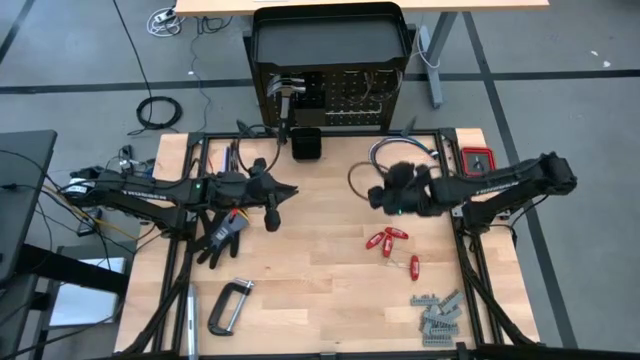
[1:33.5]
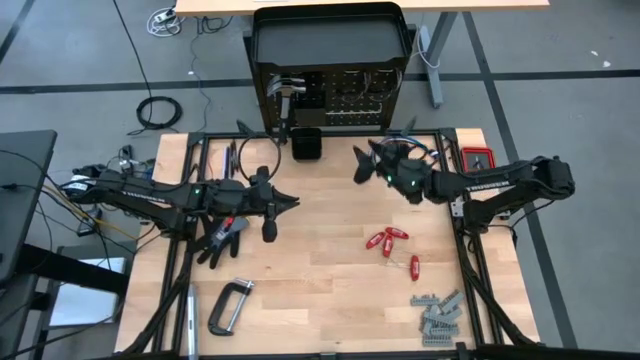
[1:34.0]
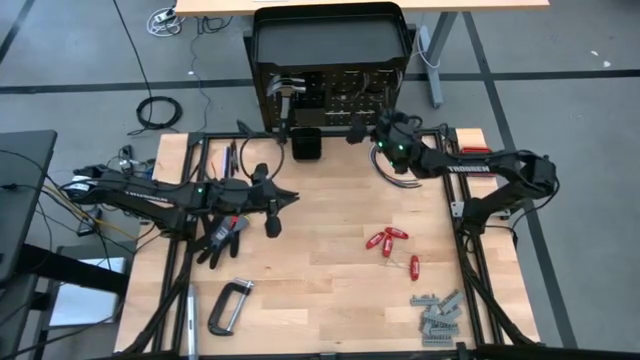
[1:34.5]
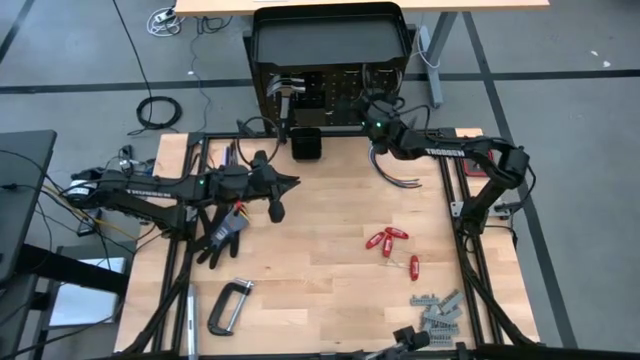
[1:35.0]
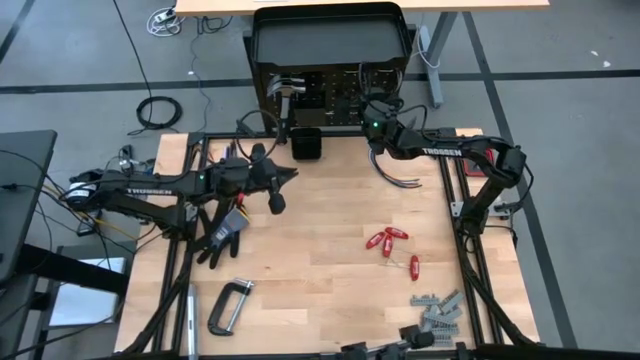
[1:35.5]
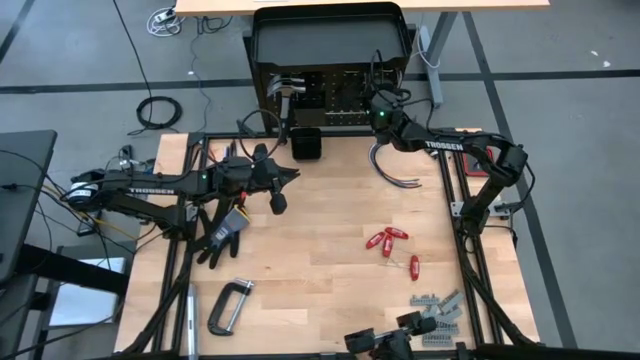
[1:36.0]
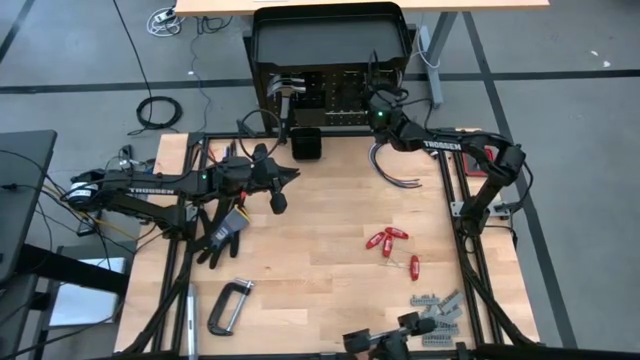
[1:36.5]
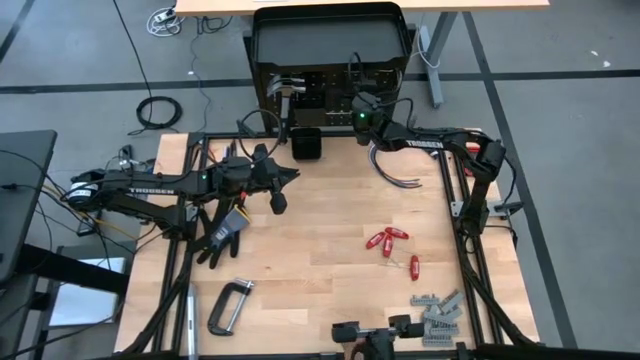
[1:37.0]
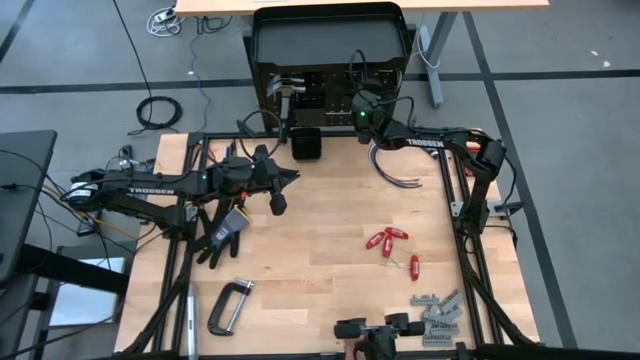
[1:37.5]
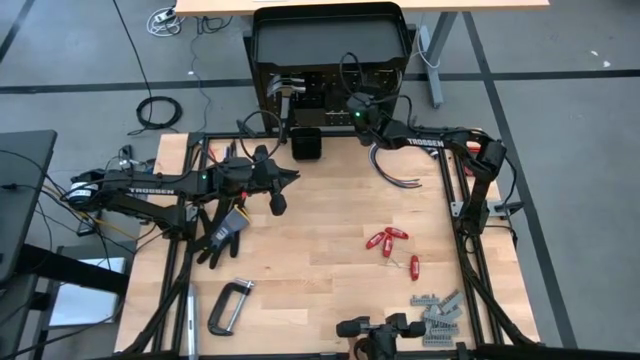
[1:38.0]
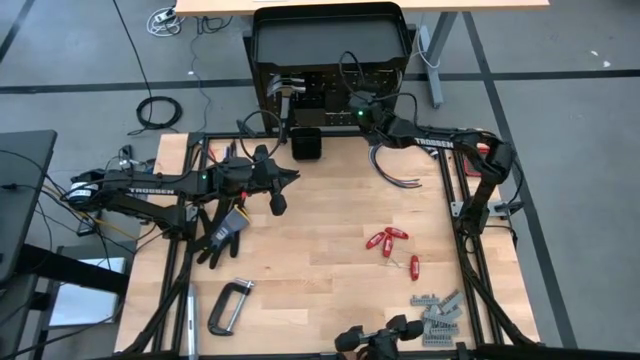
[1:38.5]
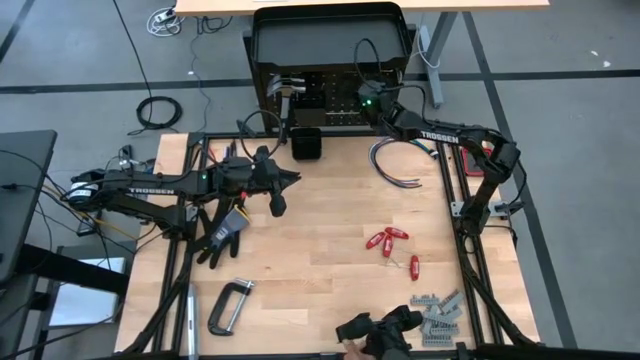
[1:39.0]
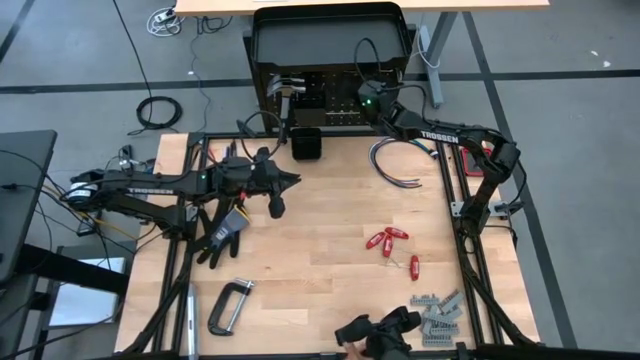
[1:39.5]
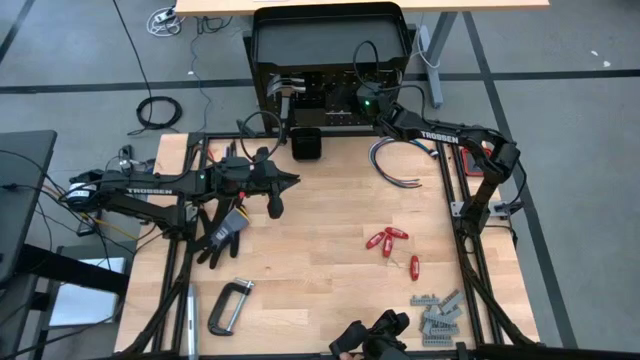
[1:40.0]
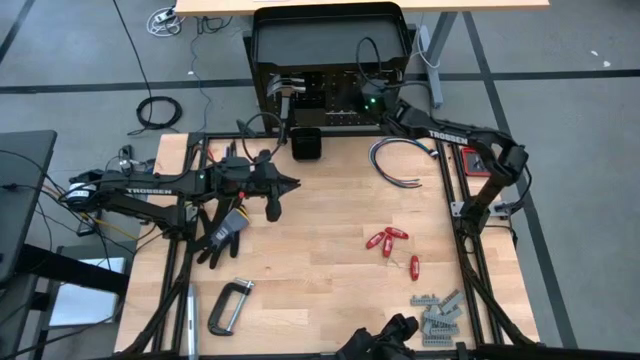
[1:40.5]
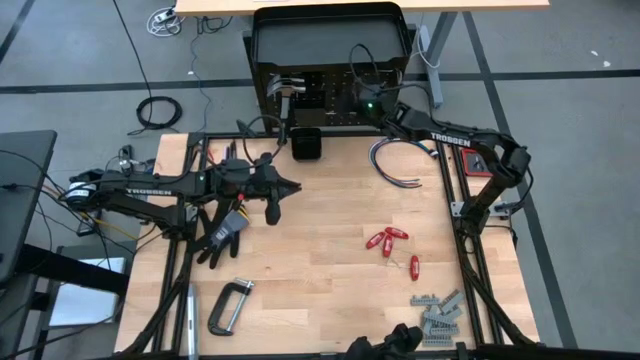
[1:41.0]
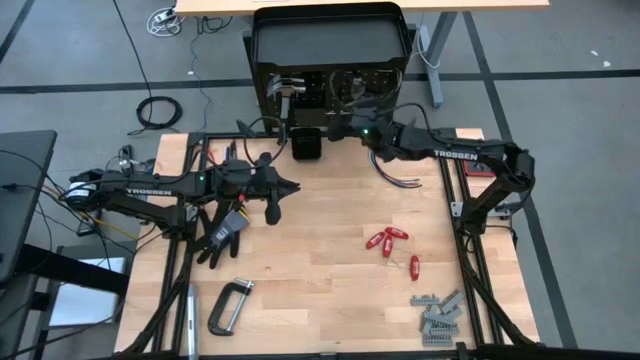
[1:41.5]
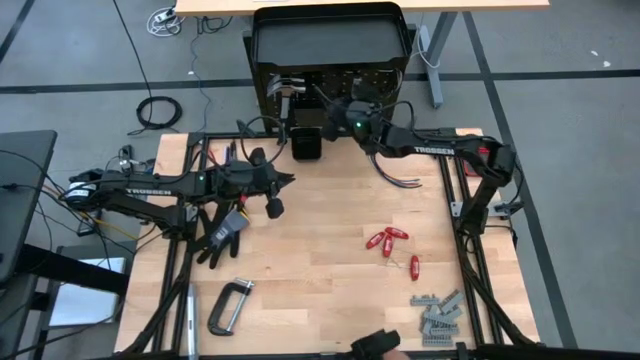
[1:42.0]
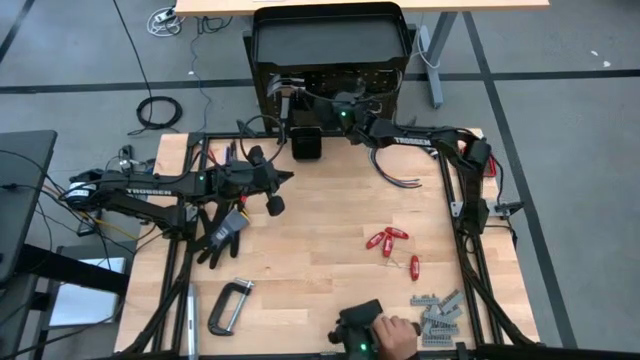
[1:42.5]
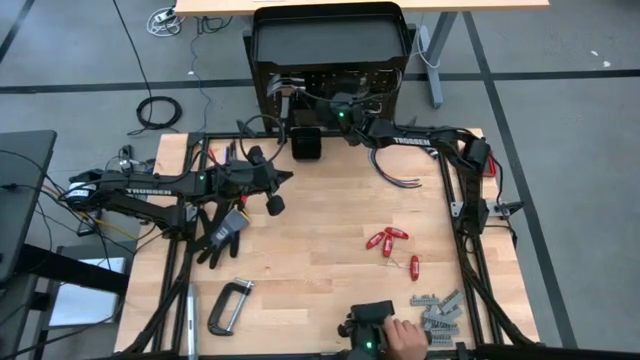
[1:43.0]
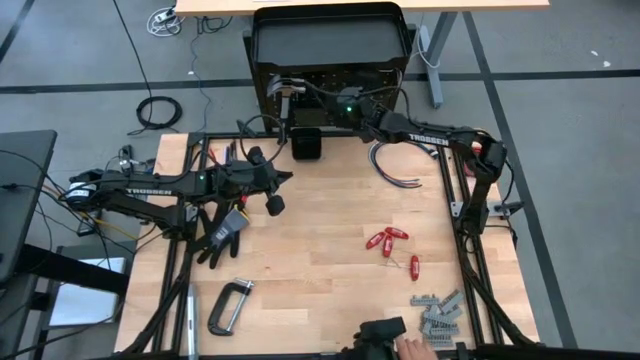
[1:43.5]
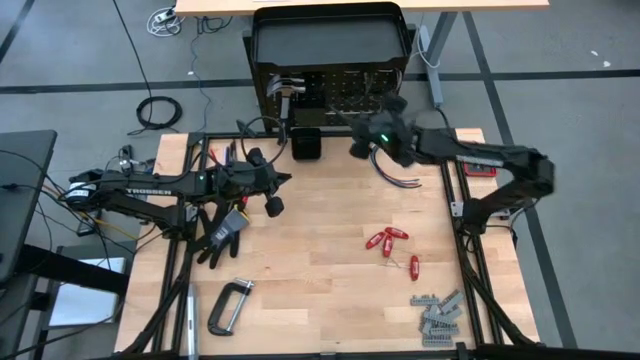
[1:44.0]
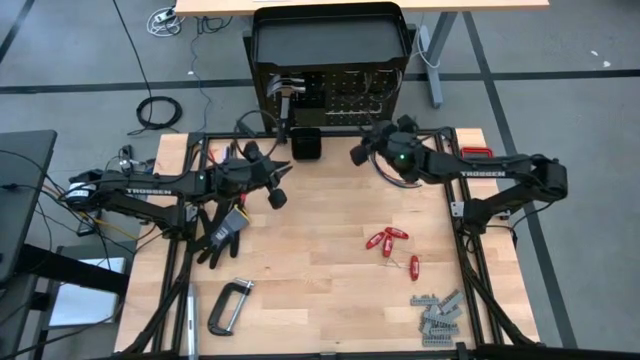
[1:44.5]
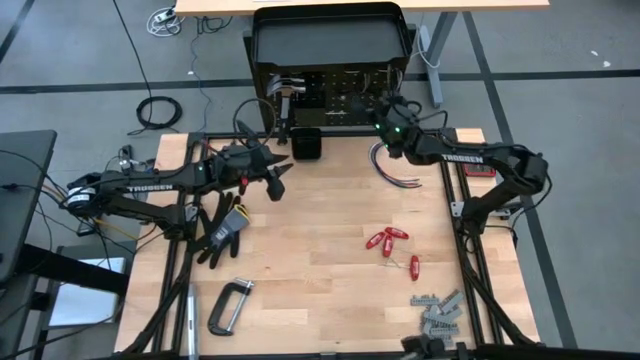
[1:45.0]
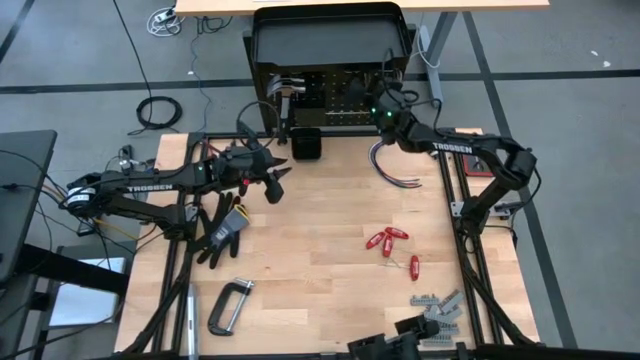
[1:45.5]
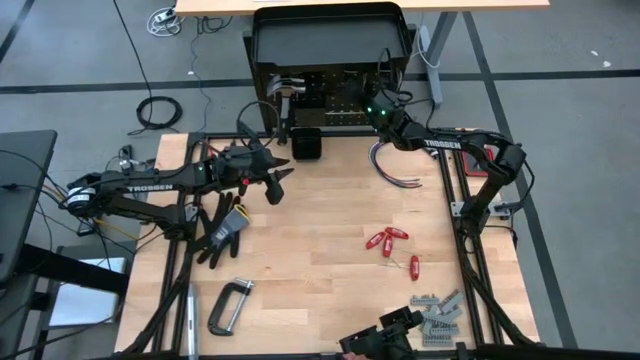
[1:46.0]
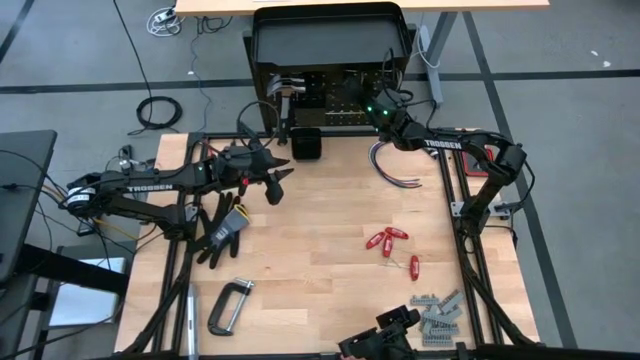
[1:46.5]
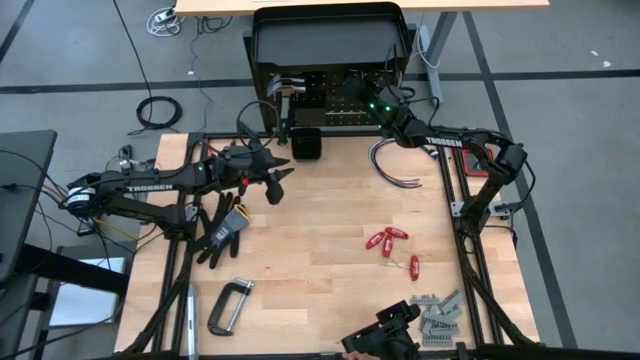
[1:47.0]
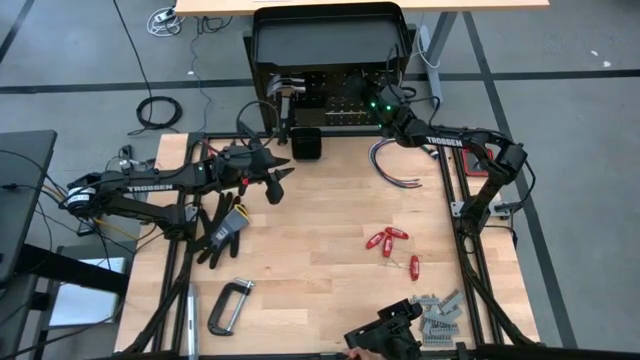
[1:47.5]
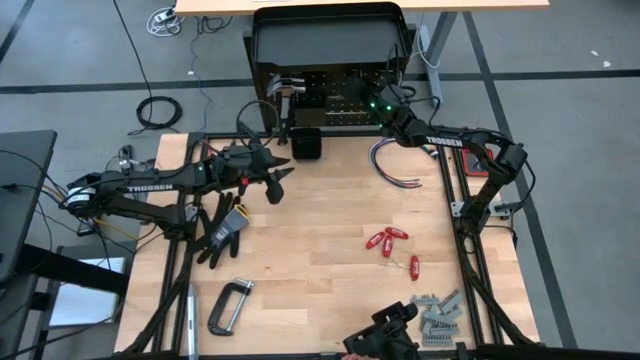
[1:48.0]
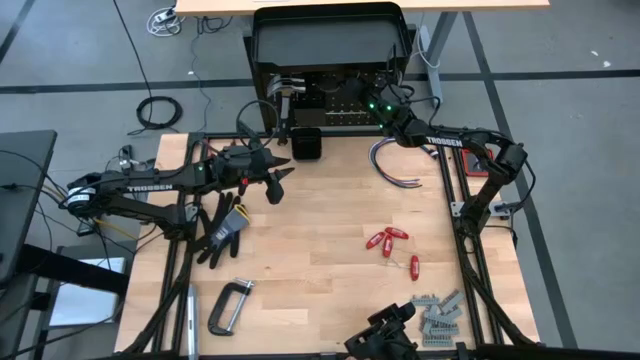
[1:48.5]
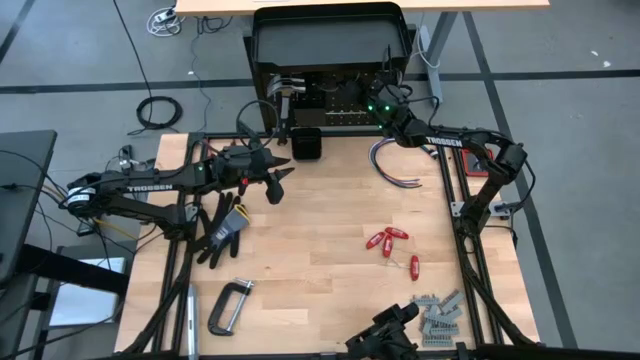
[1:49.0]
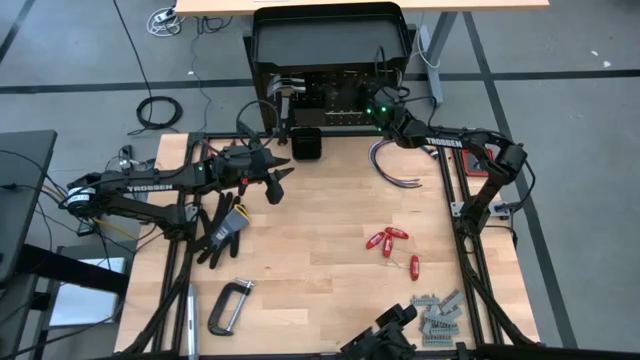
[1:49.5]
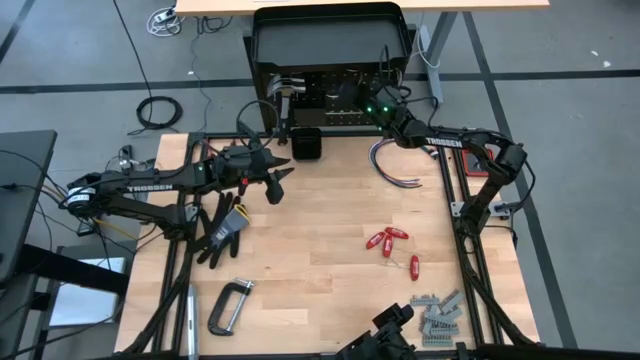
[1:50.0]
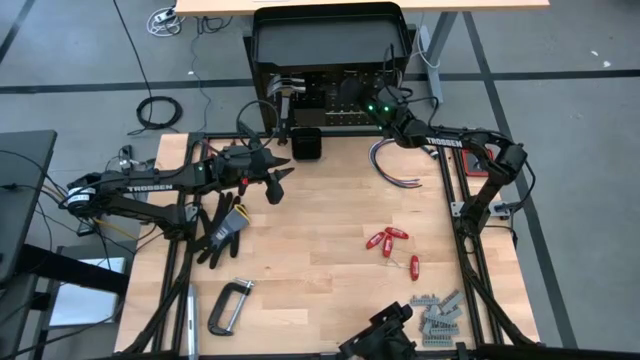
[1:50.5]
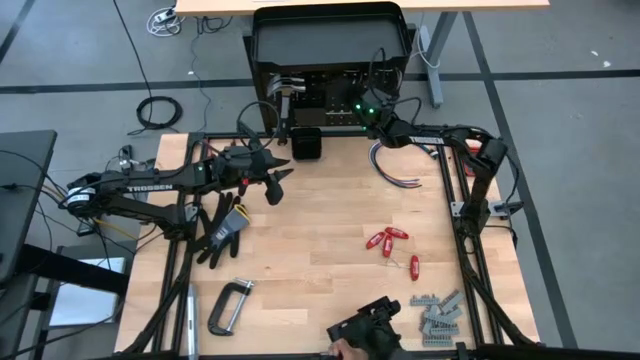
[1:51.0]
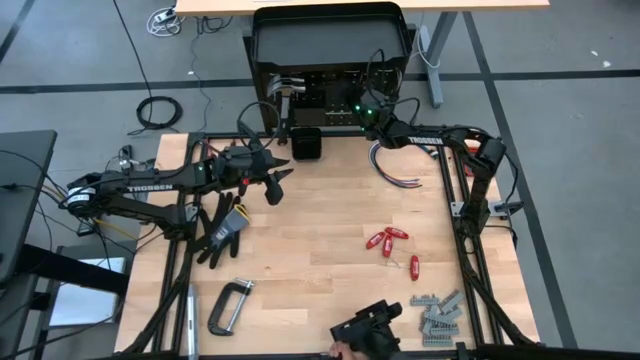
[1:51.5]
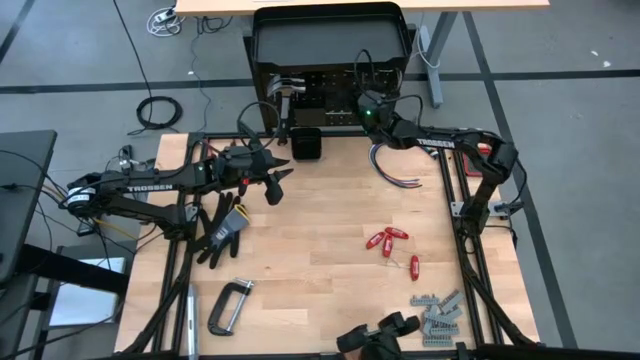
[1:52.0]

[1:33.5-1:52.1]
Task: Hang tools onto peg board
Hang the safety goggles on the peg board

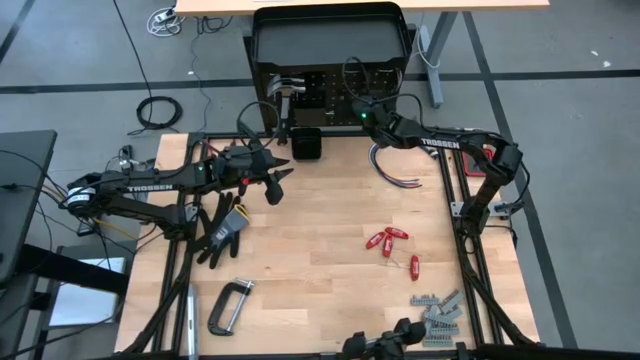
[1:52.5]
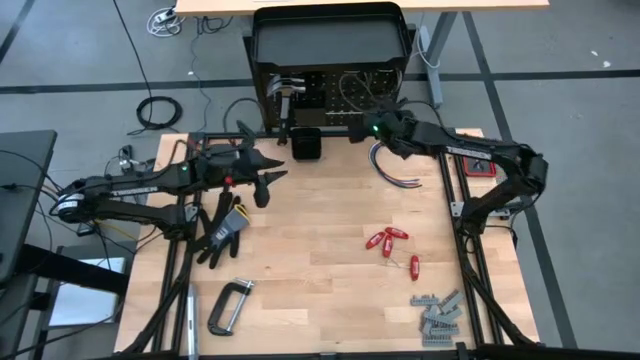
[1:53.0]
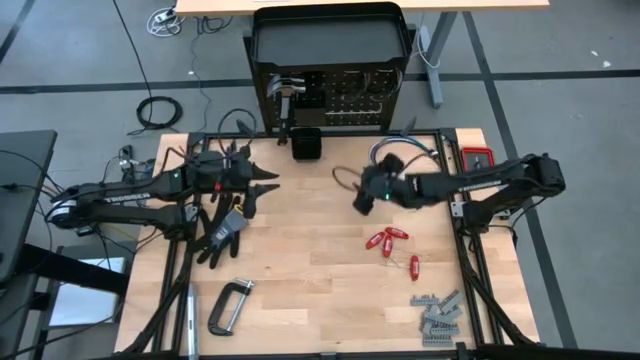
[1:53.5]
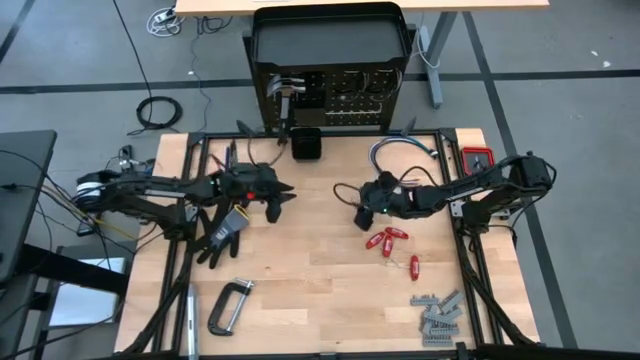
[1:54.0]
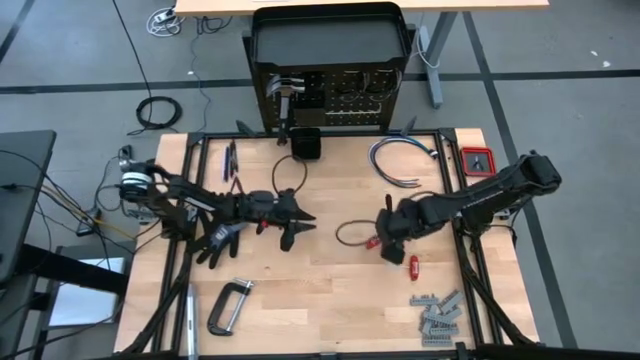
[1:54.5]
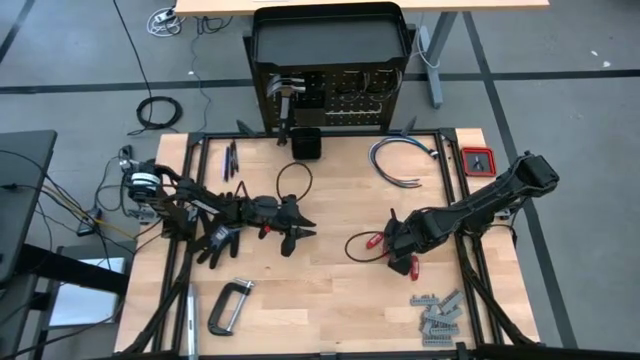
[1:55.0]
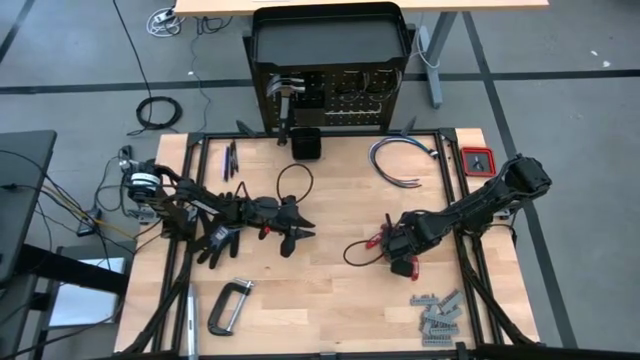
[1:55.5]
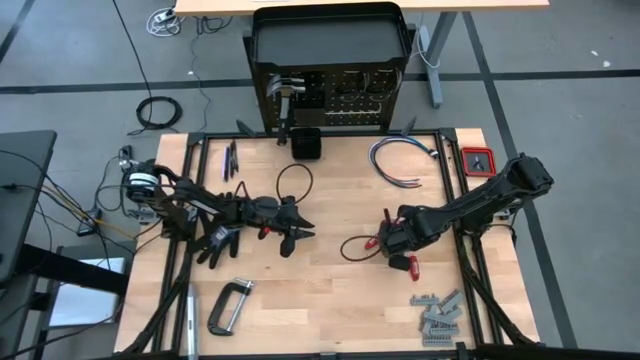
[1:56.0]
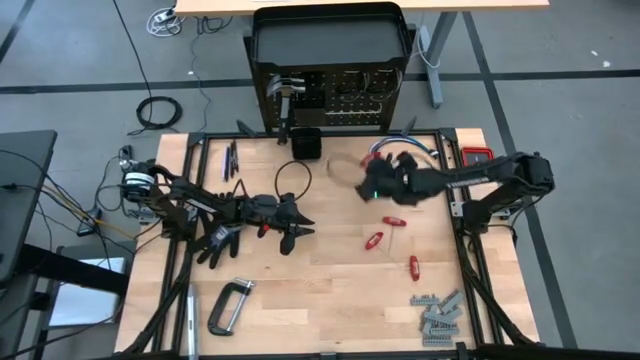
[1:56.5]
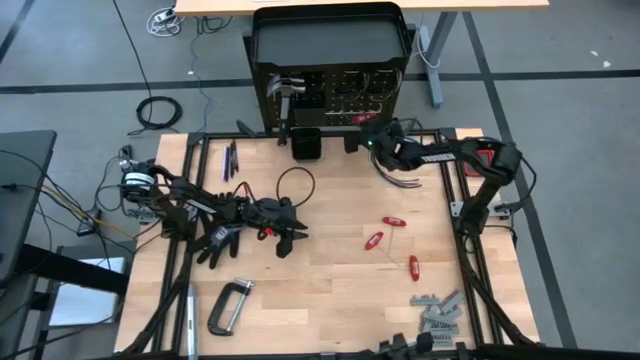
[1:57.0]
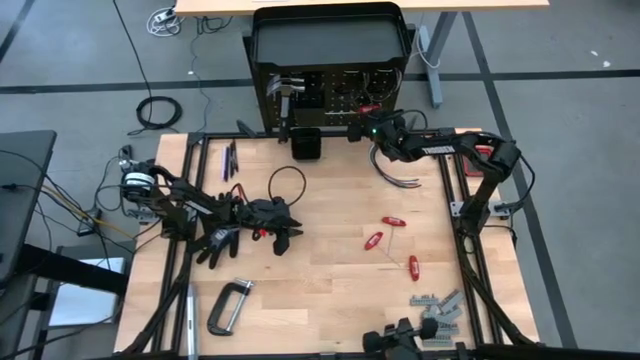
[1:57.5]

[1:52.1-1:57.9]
Hang the red allen wrench on the peg board
